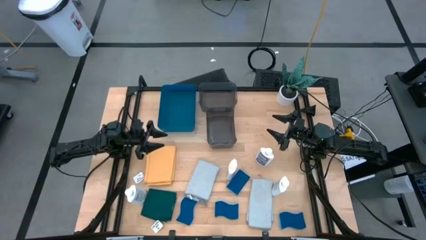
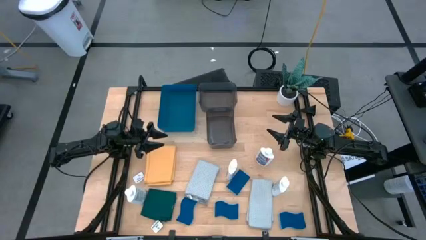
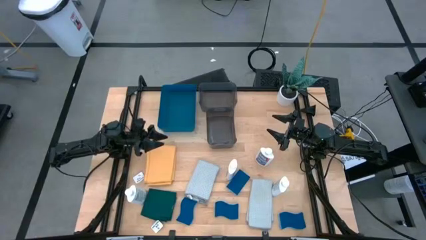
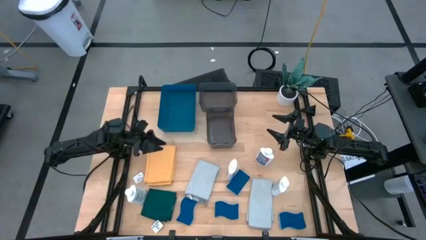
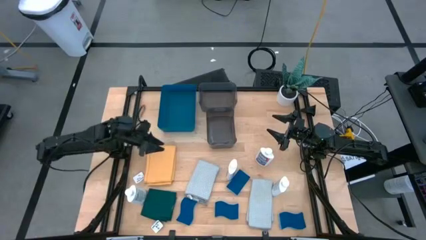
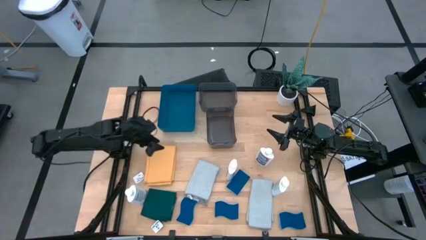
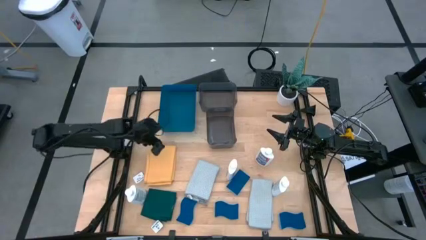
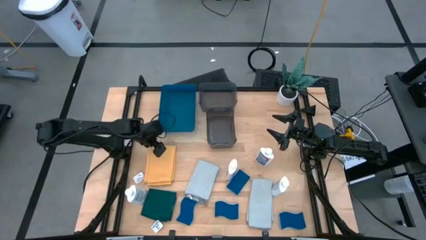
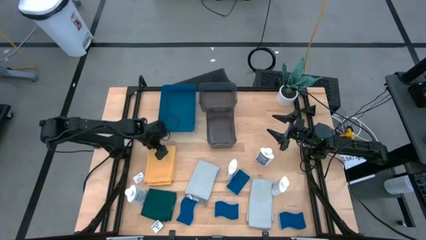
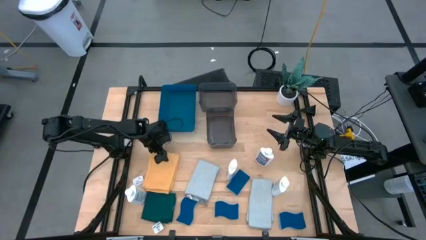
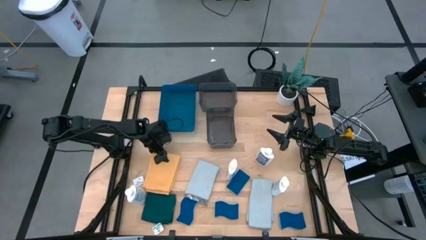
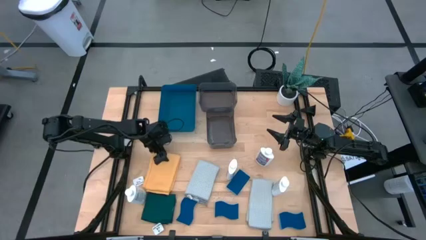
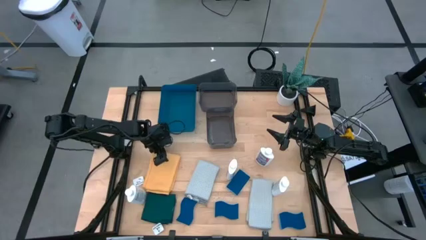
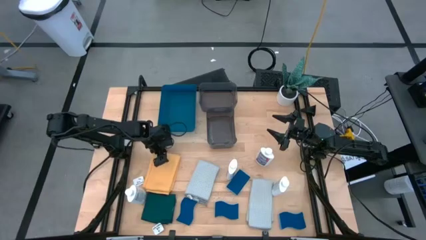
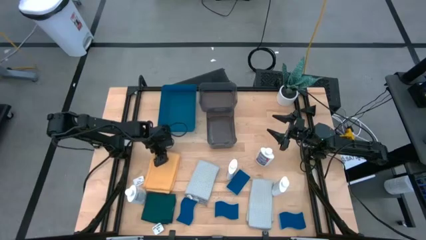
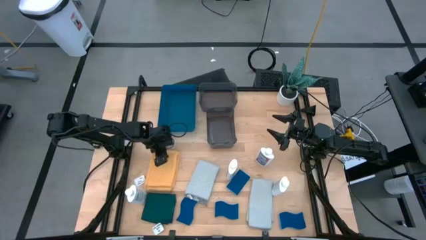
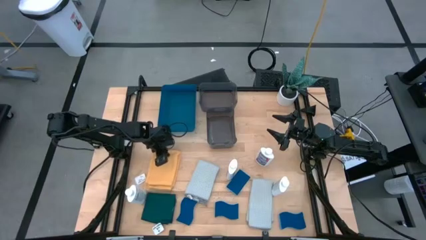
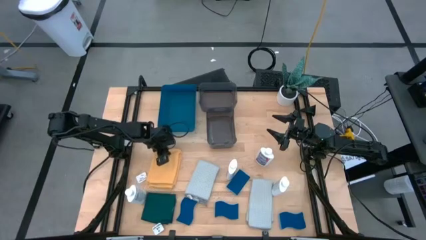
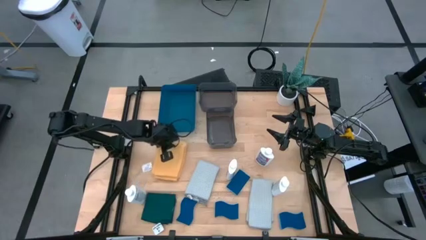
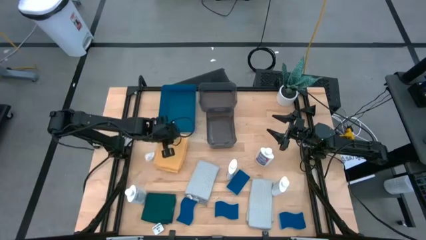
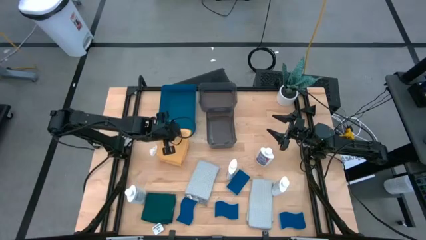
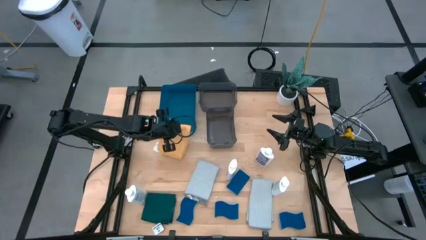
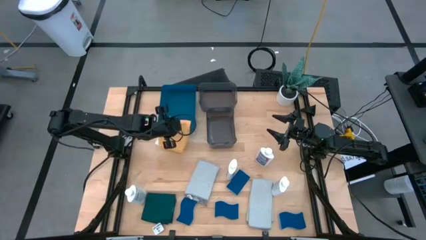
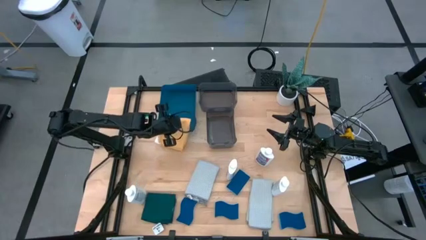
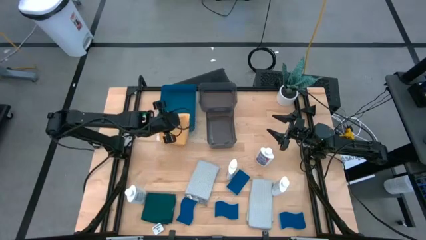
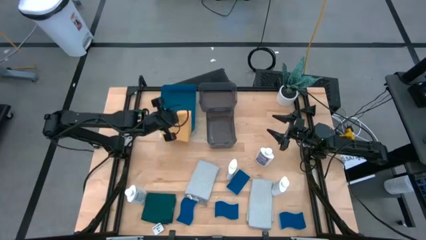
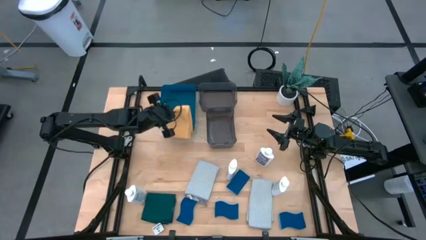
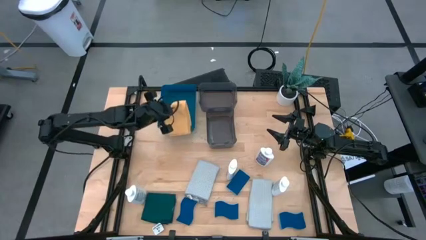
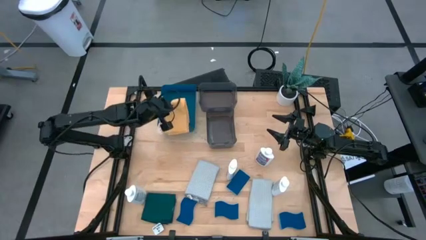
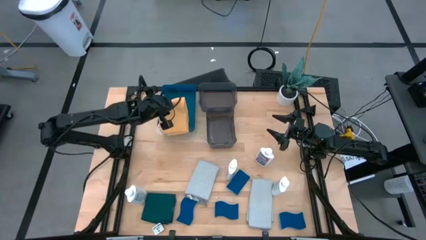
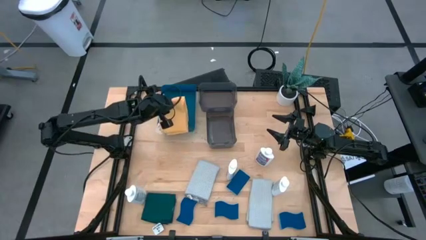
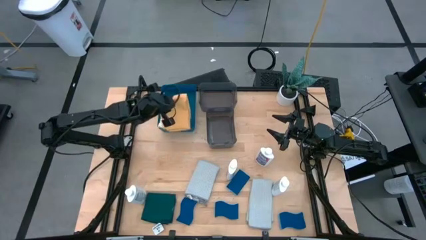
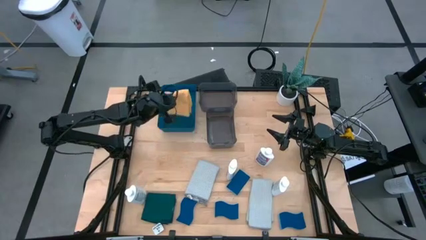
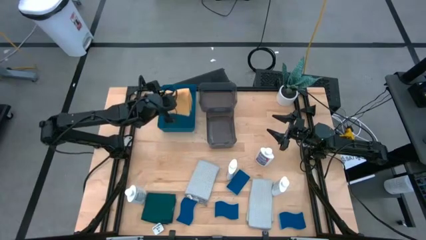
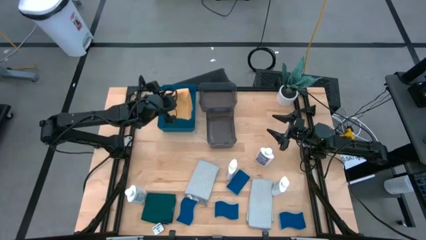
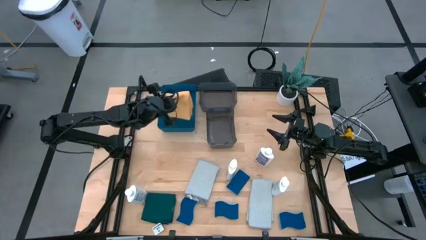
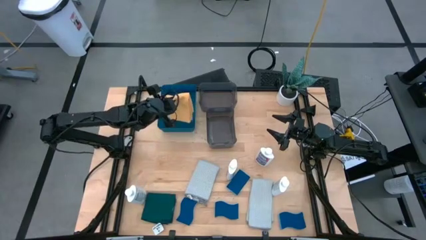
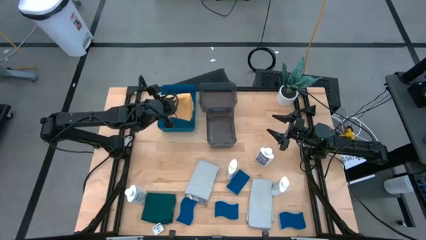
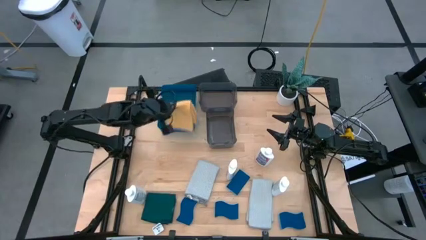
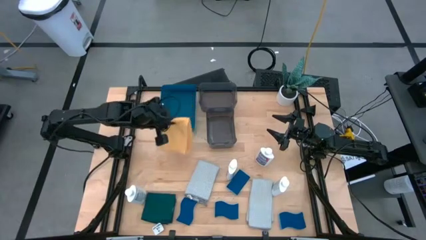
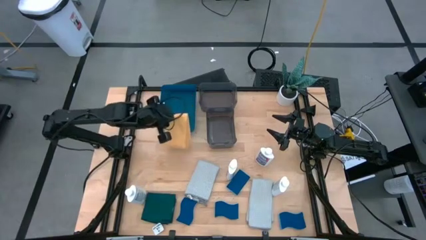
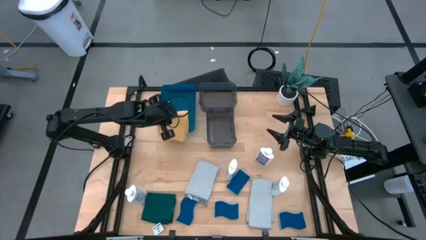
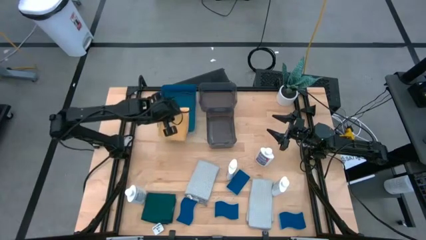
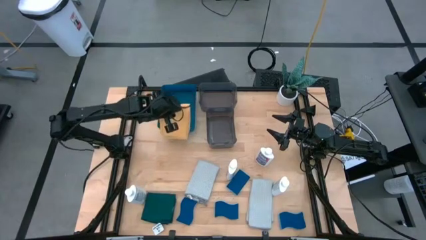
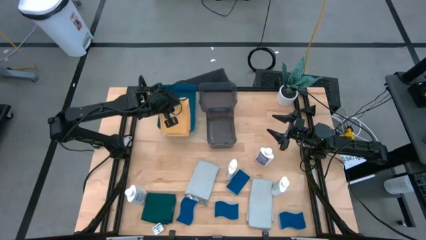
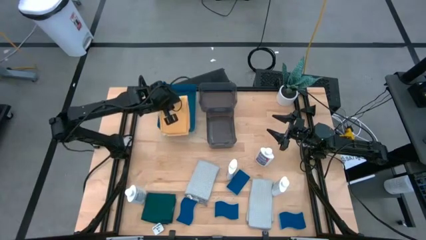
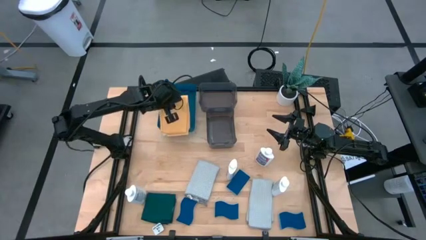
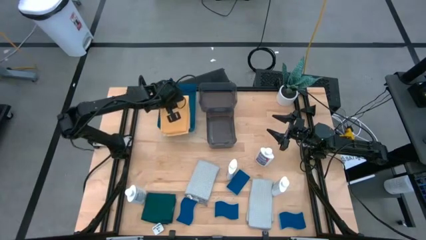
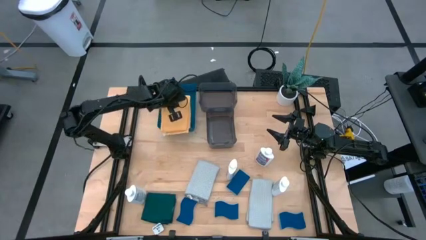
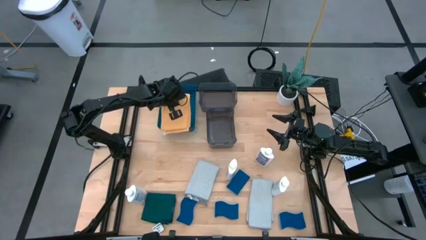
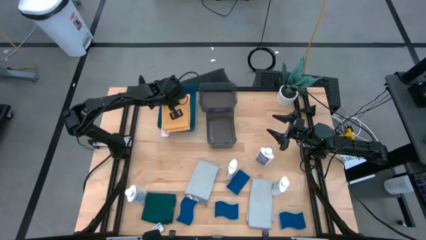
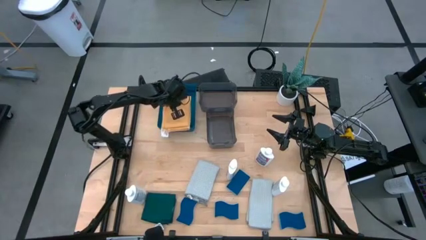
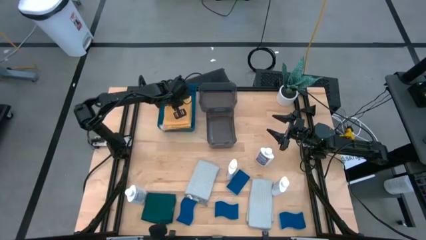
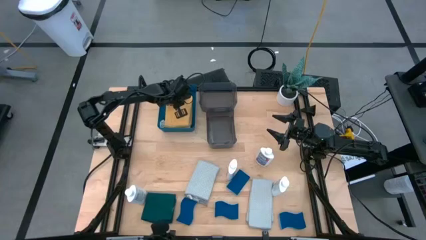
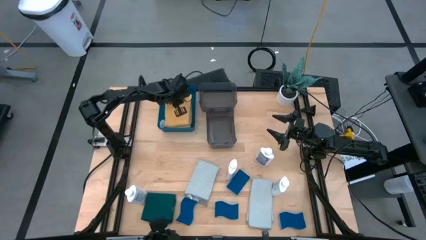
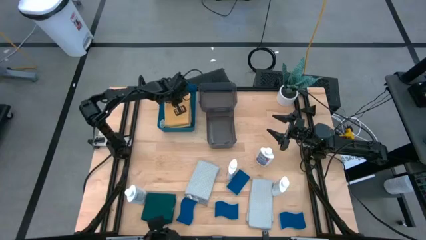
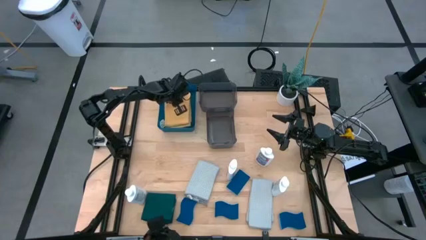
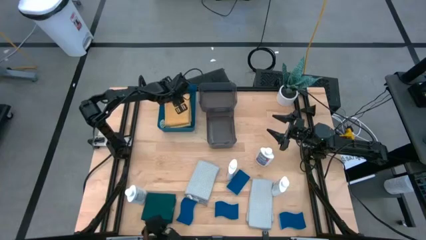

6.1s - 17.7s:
Task: Pick & Place Kitchen Items
Put the orange microfiber towel into the blue bin

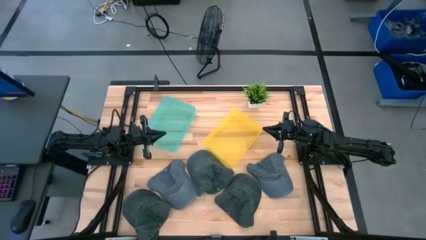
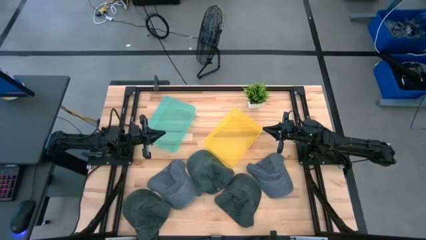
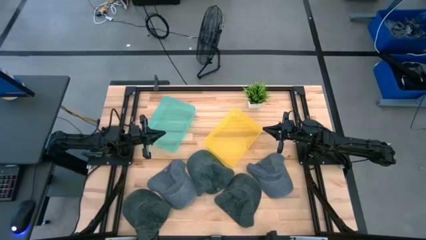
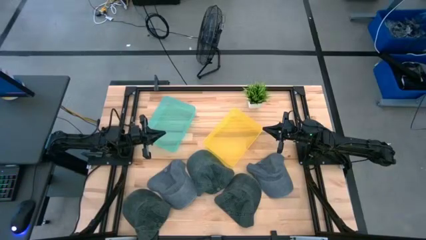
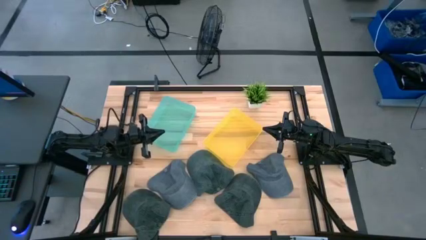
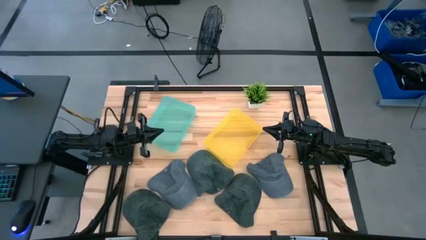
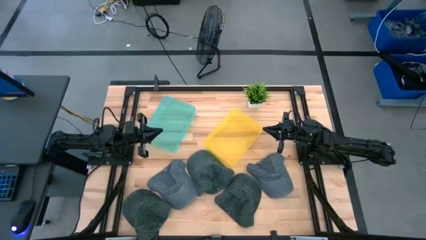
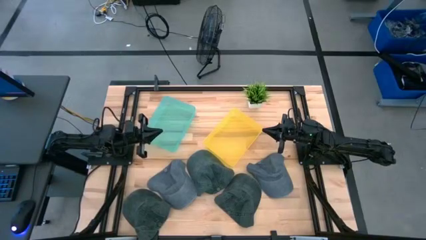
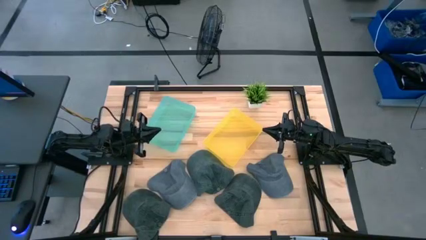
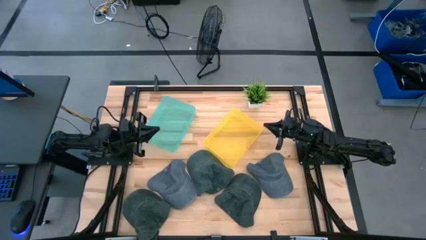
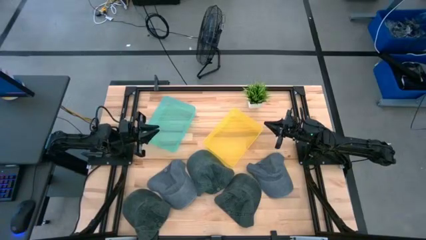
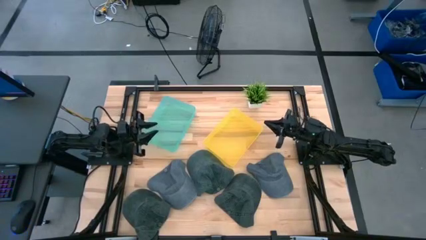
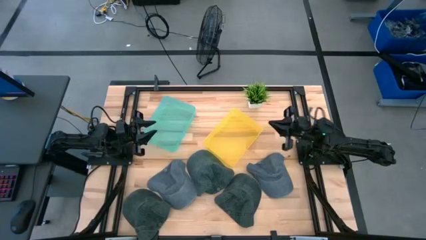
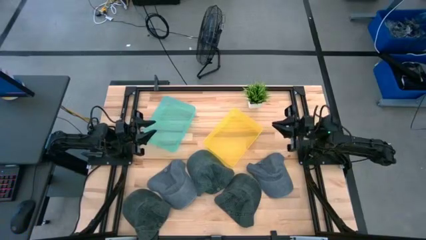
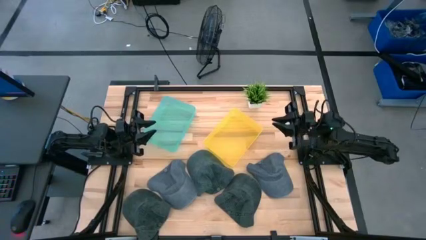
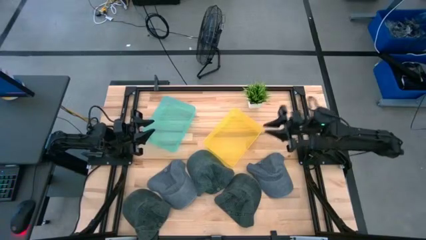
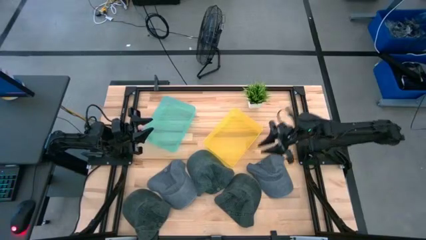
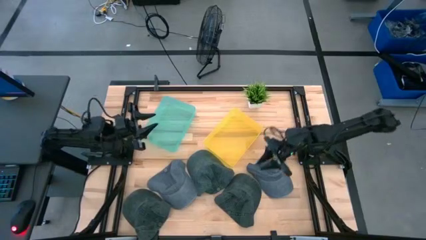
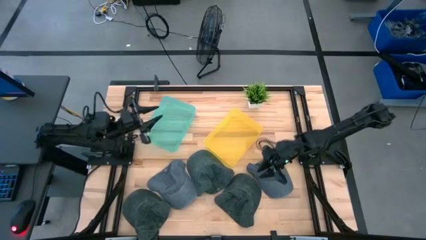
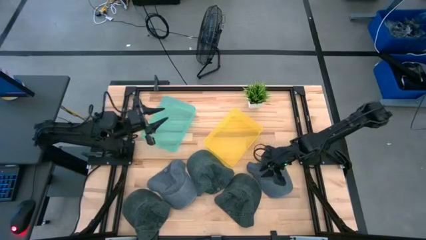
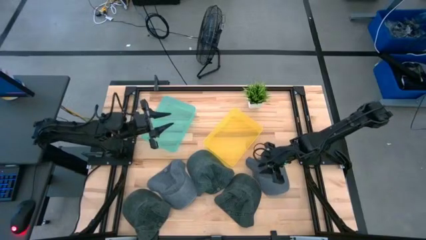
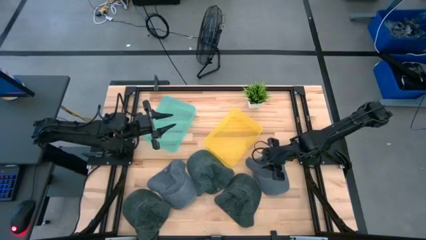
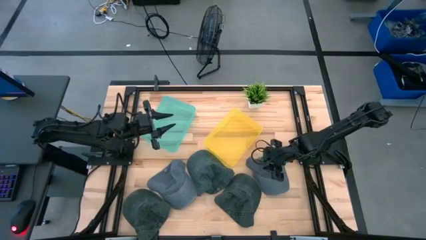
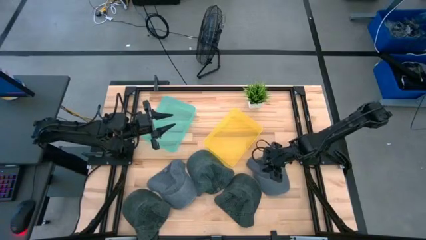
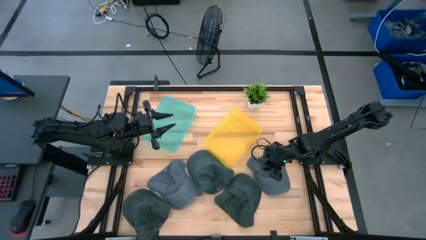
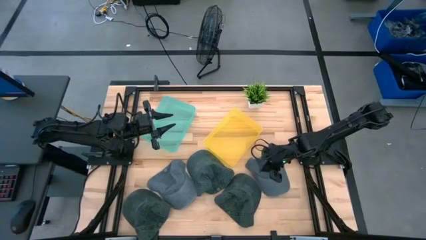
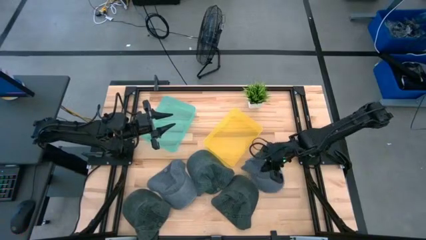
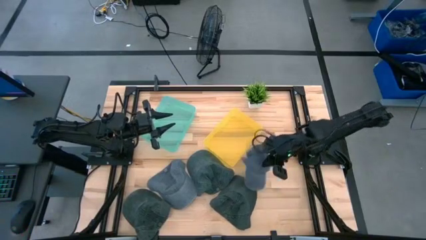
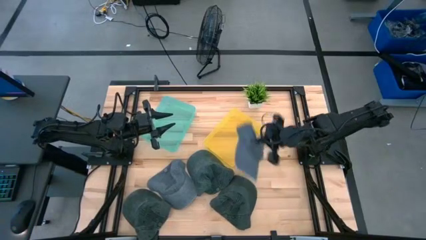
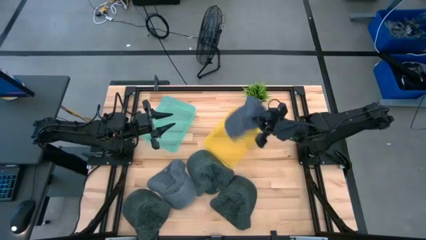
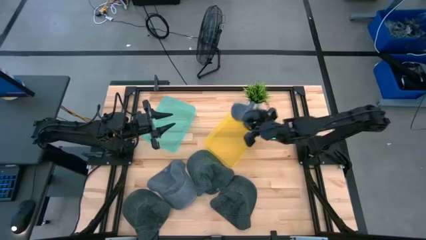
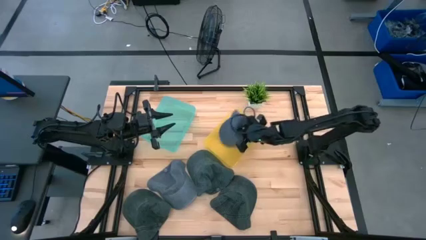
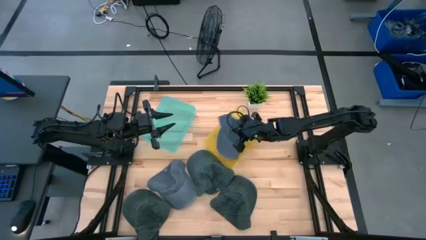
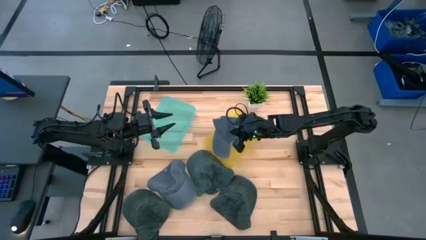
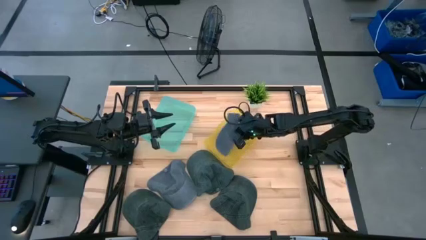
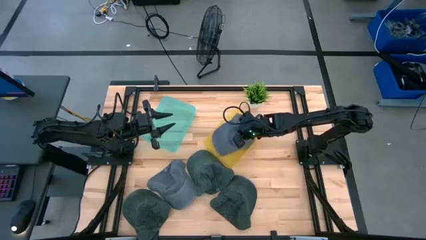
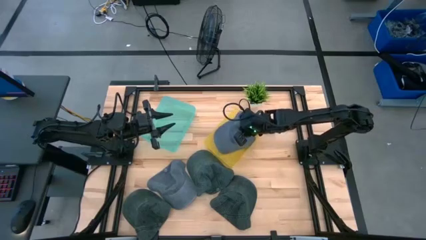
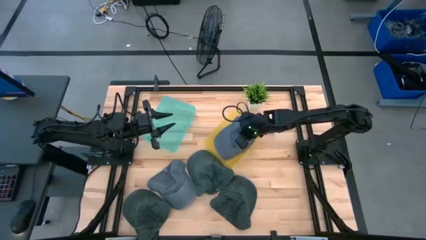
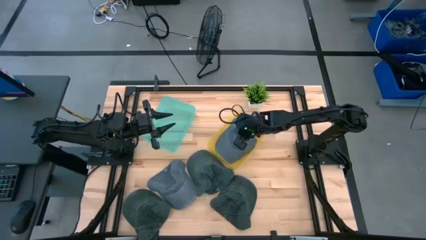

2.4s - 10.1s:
Task: Pick & Place hat
Put the right blue cap into the yellow basket
